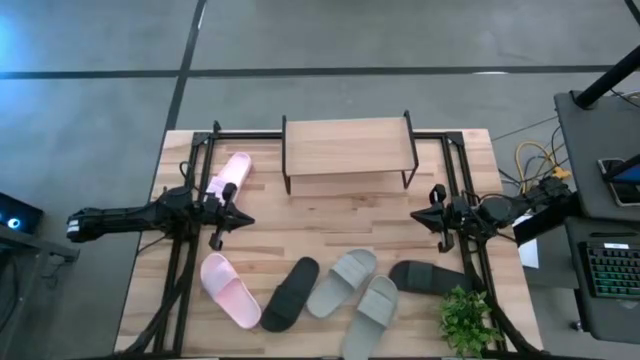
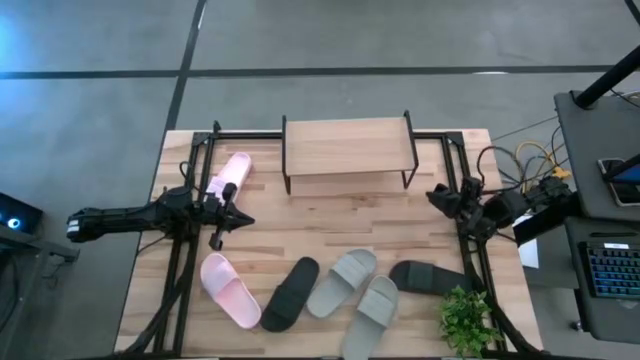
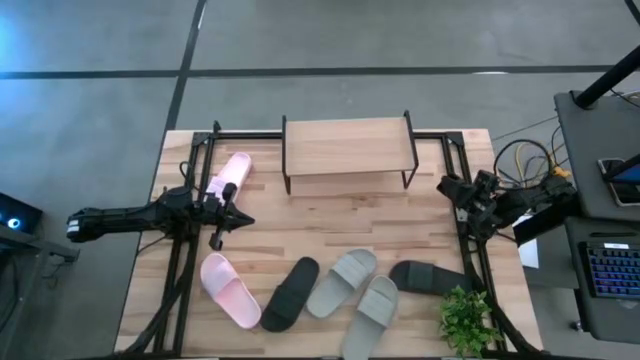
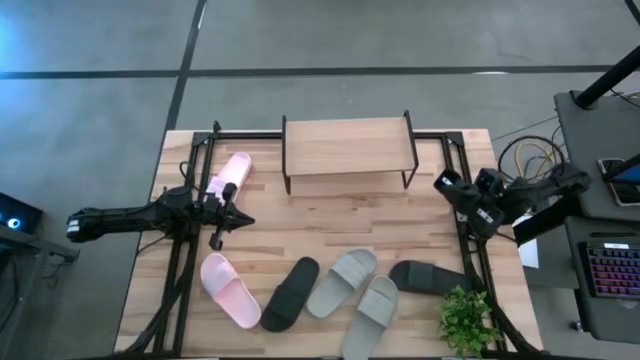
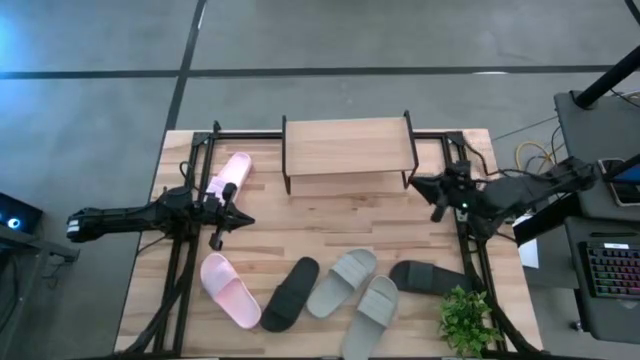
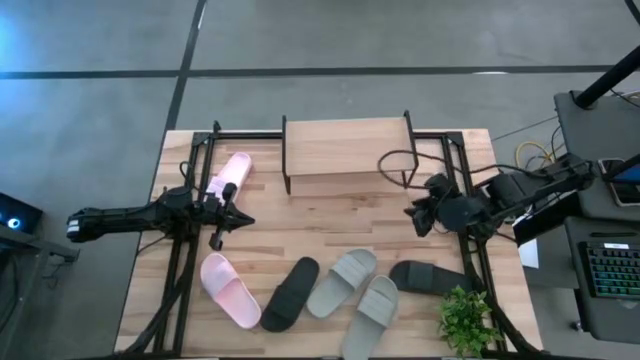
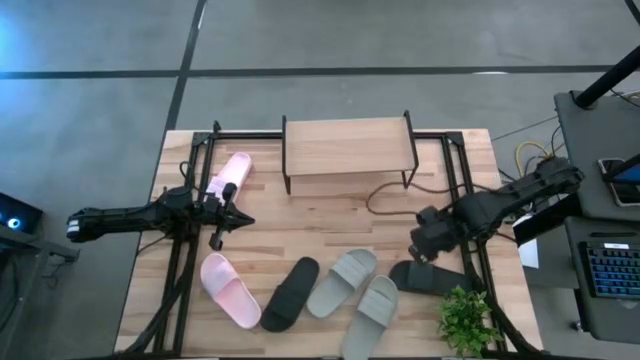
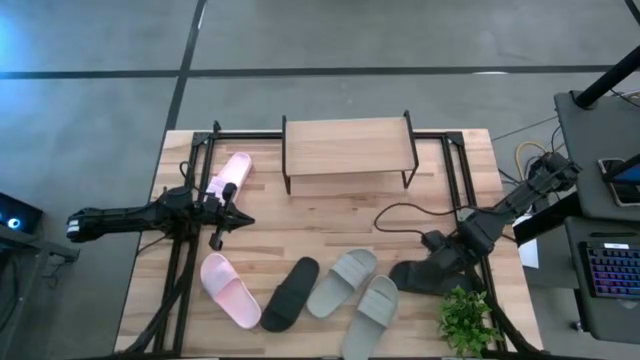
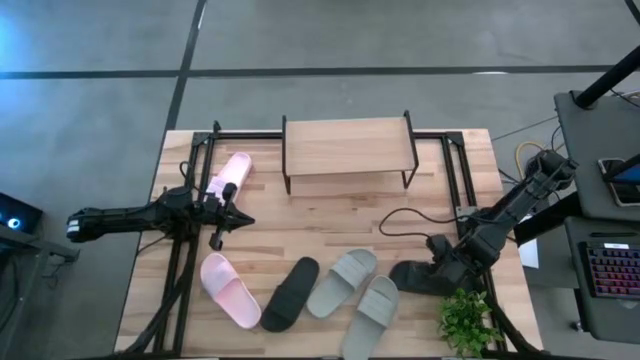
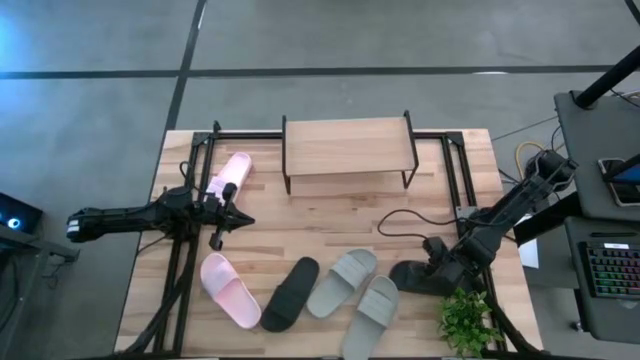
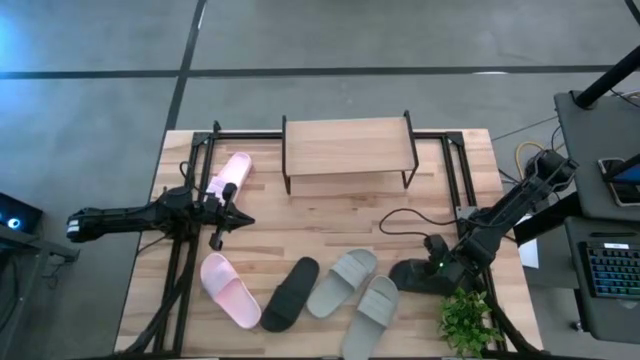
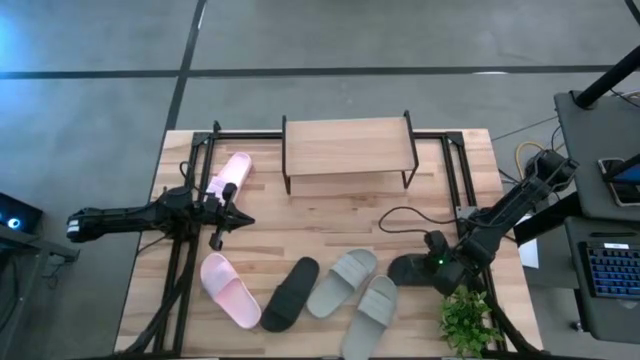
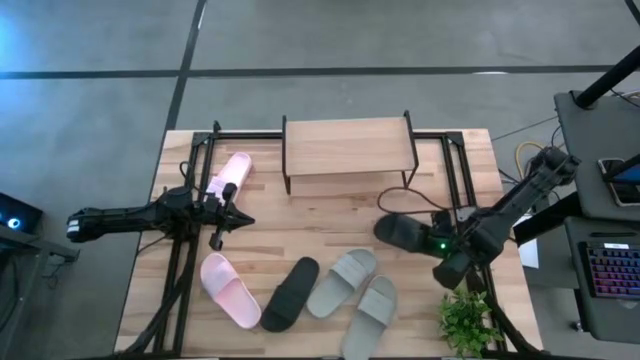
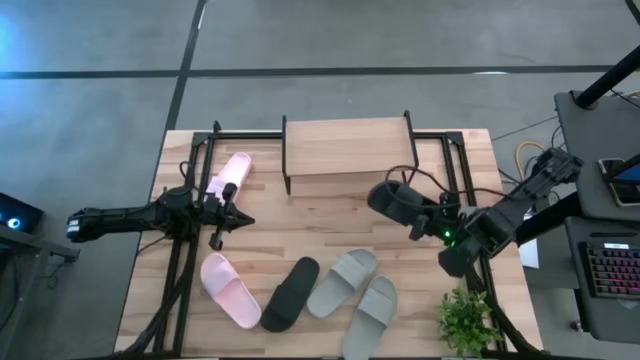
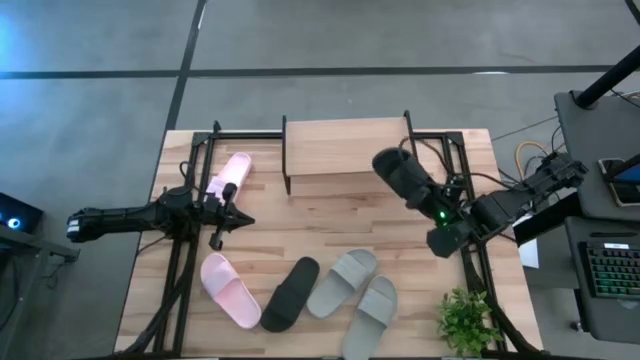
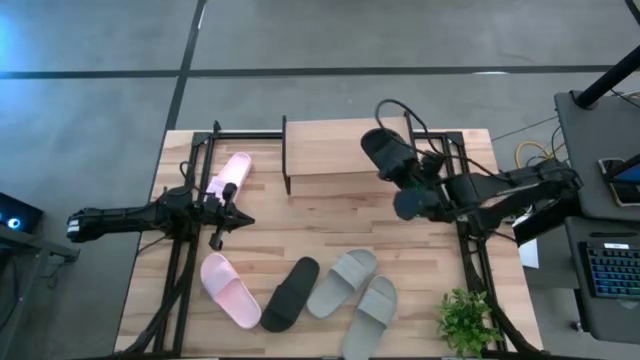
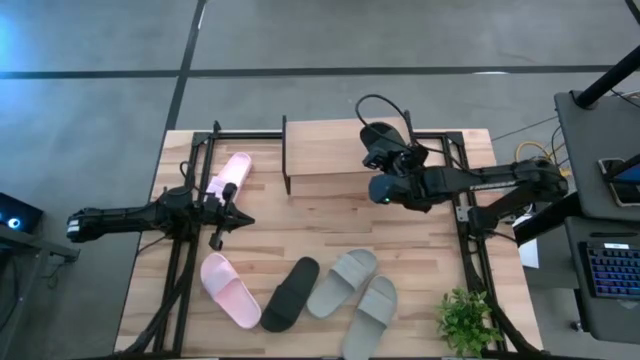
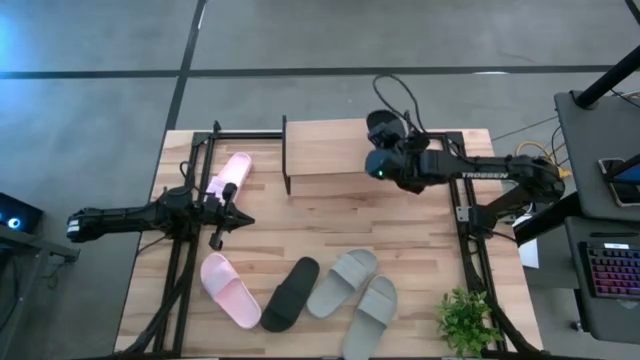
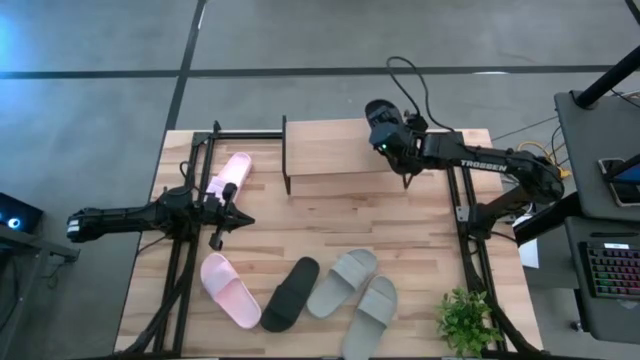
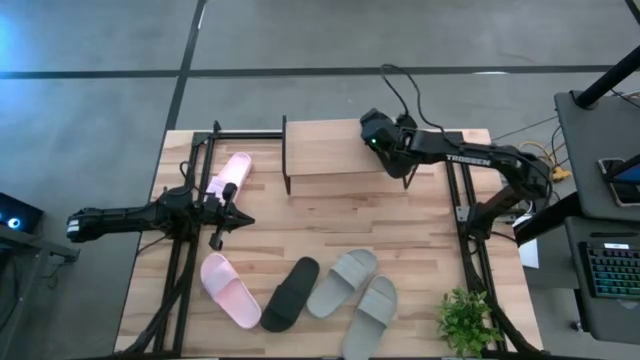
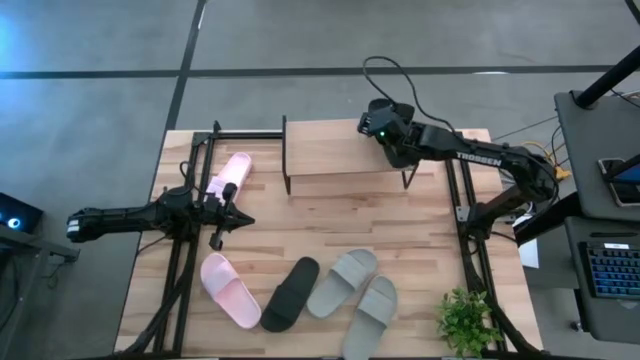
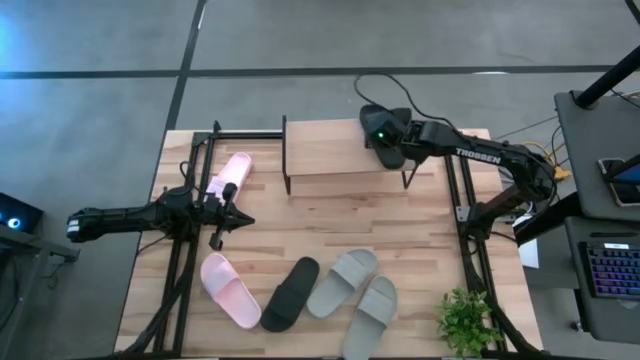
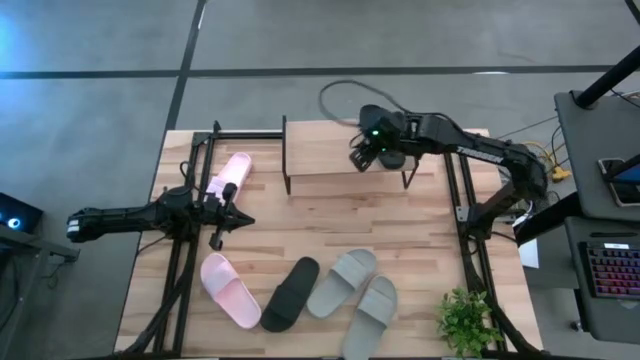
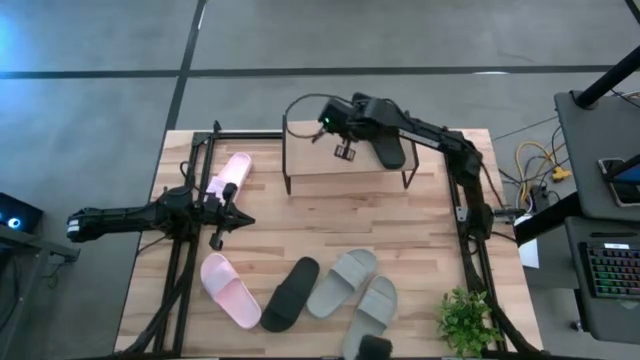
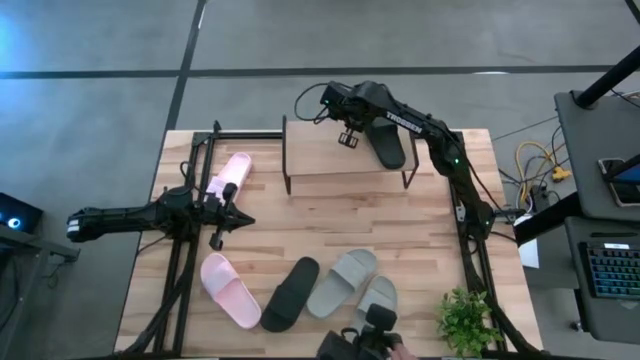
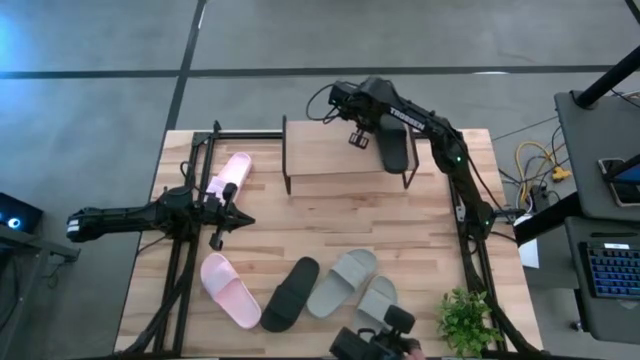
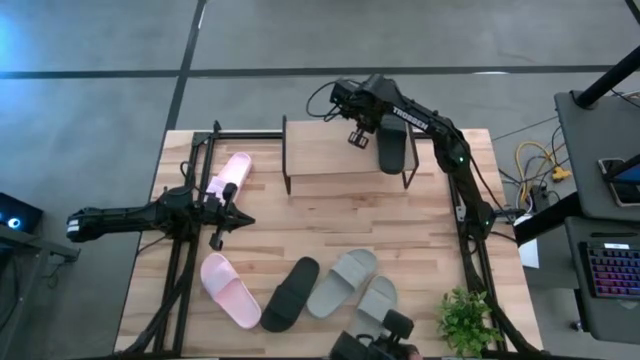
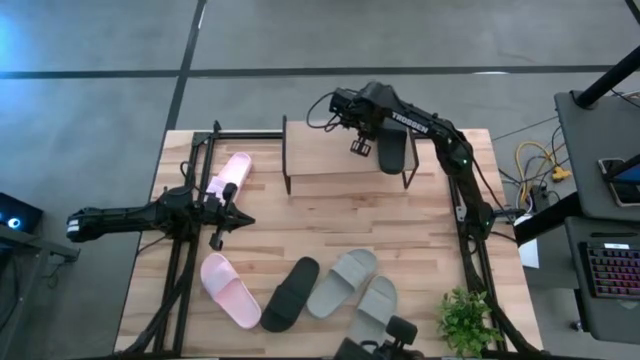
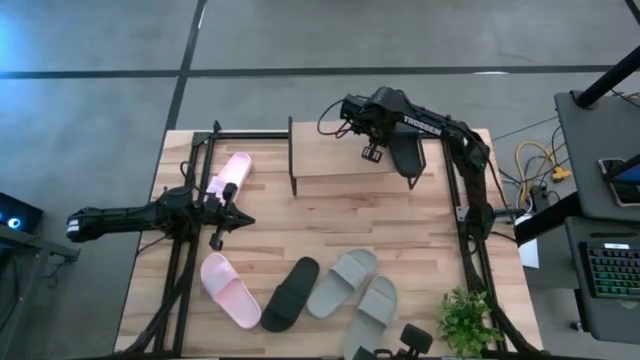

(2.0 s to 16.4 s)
Task: Pick and place slides into the shelf
Put the right black slide on the shelf

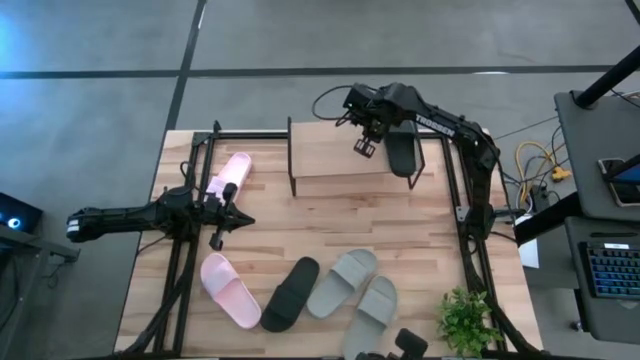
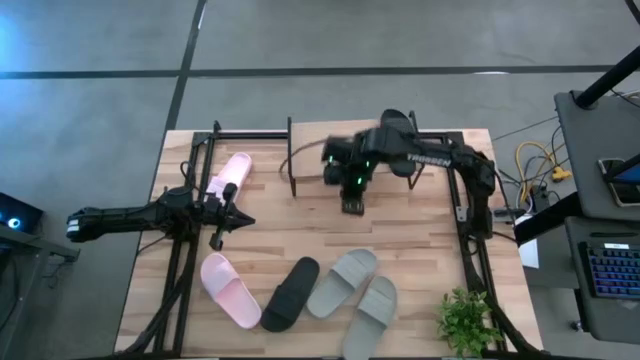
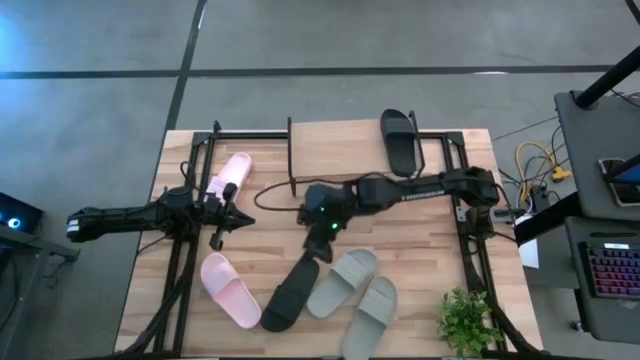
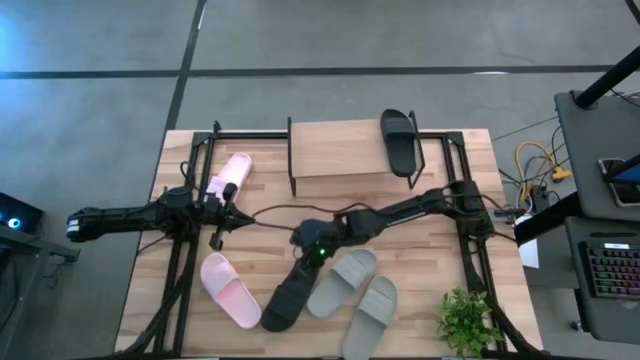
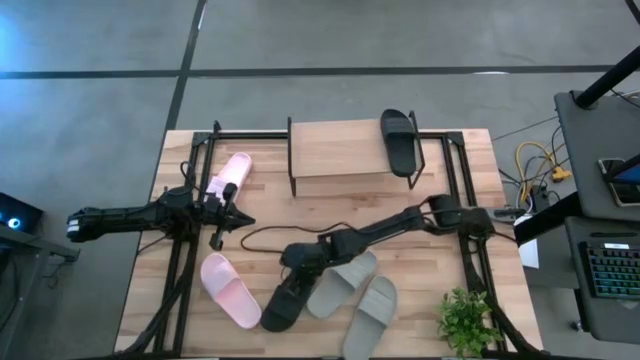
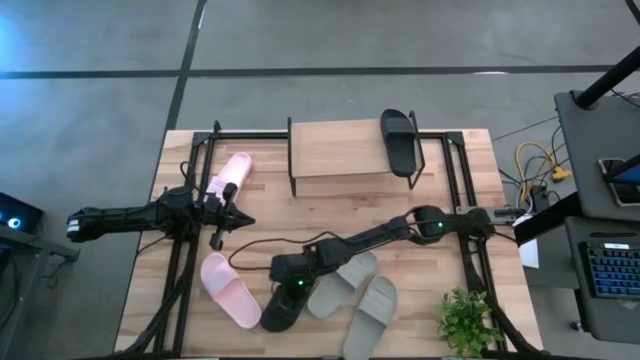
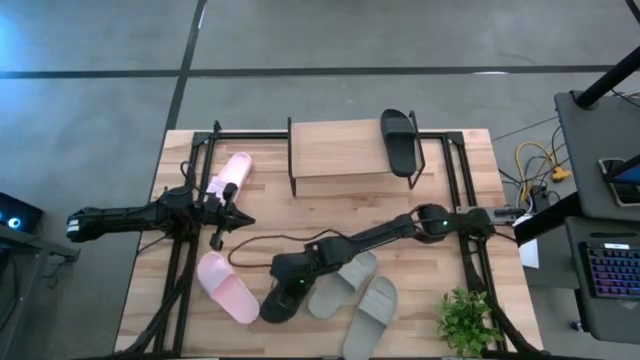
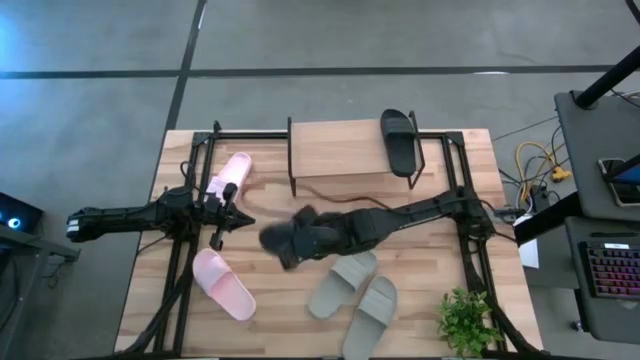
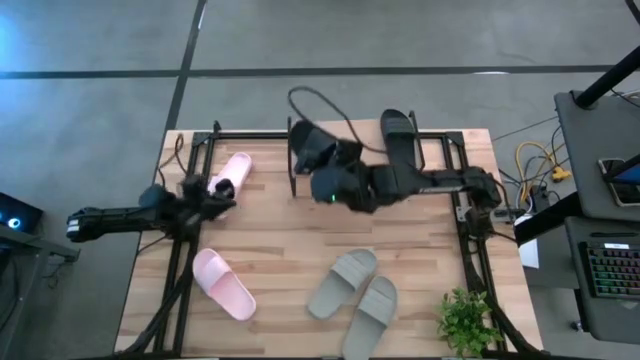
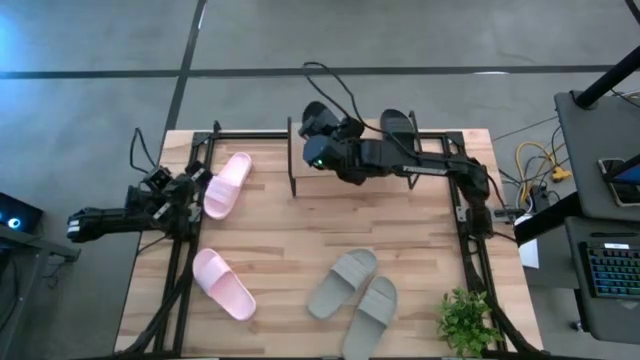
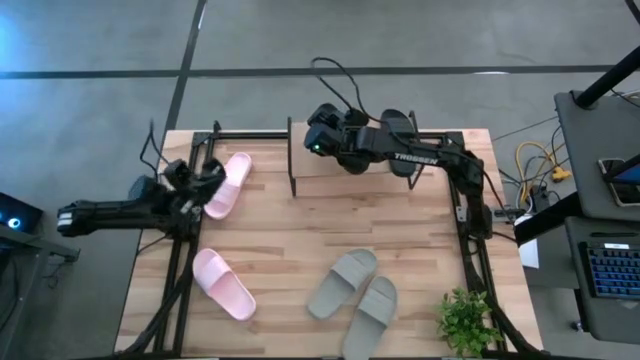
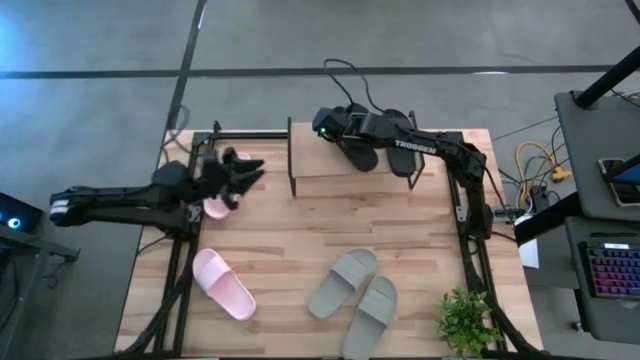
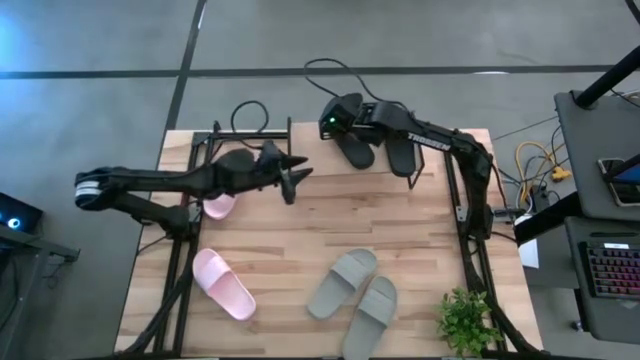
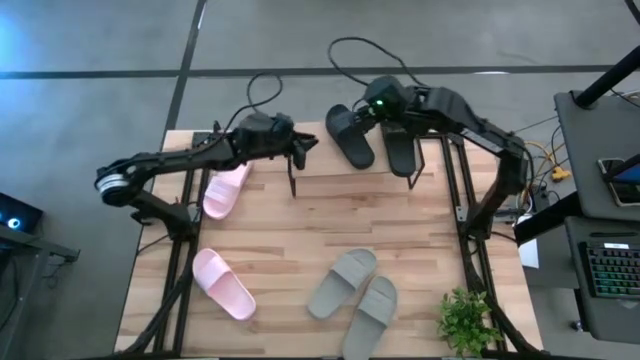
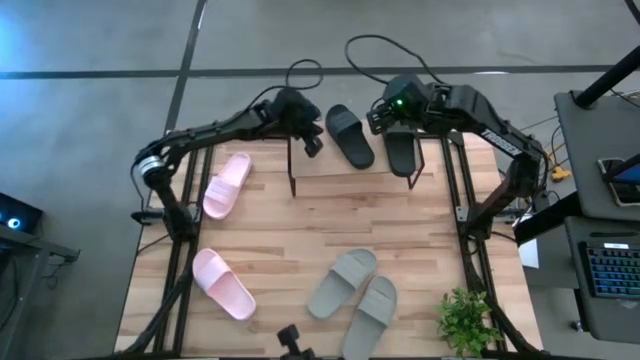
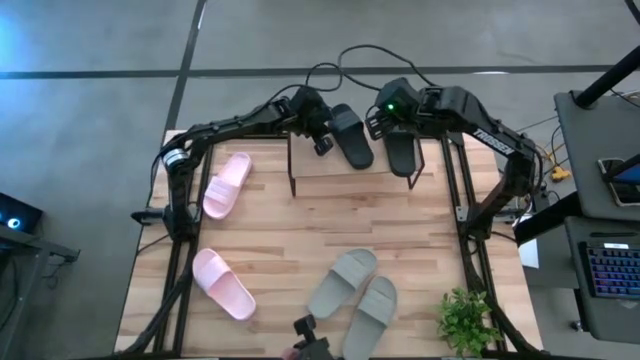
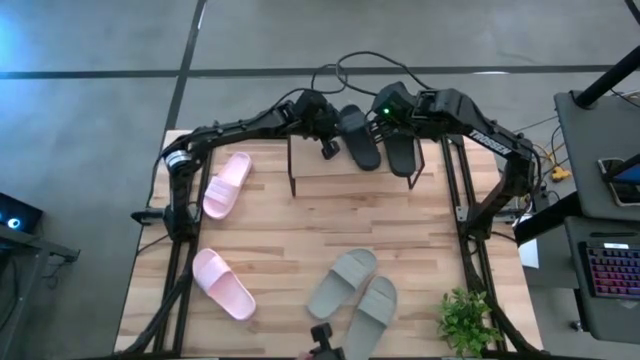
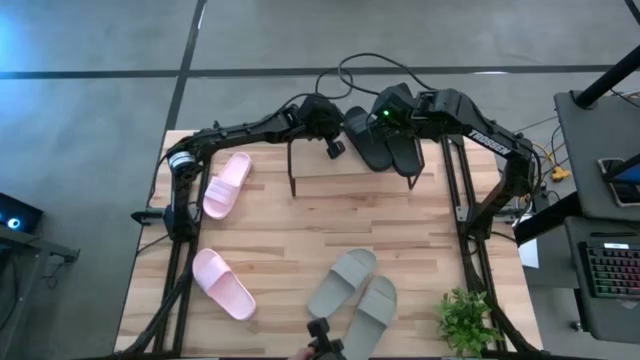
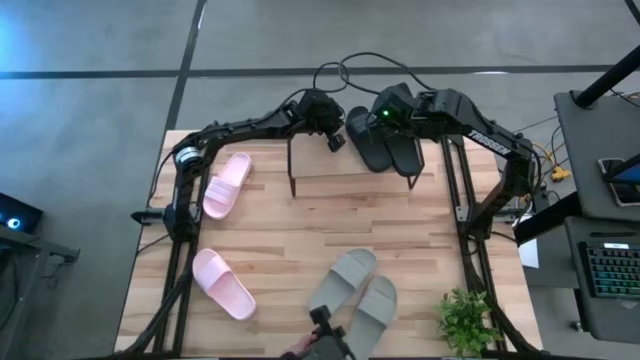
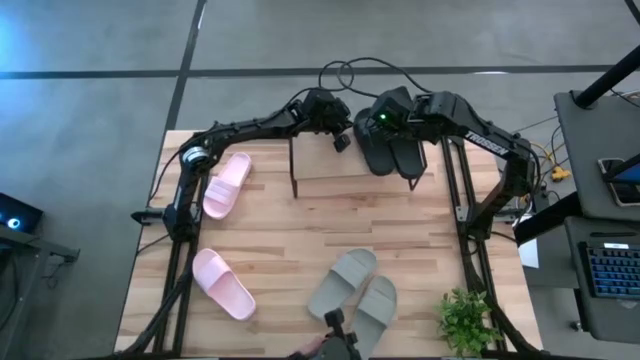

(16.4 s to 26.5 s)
Put the left black slide on the shelf
